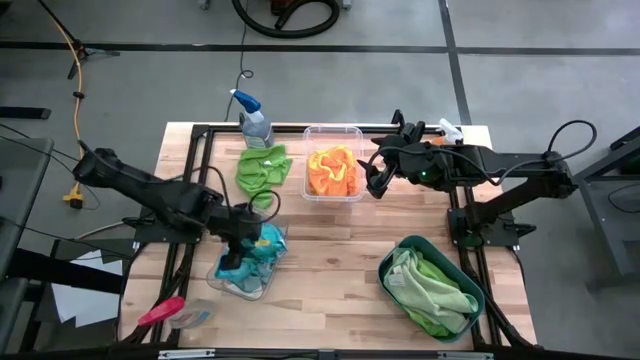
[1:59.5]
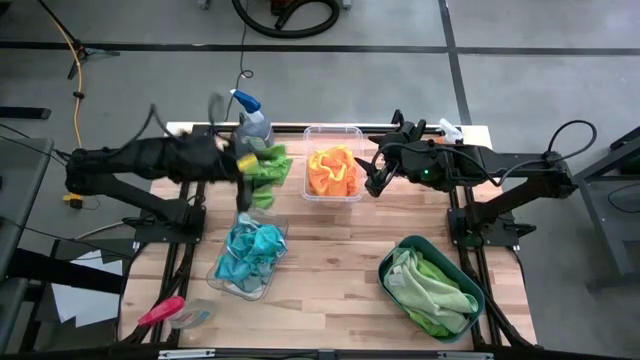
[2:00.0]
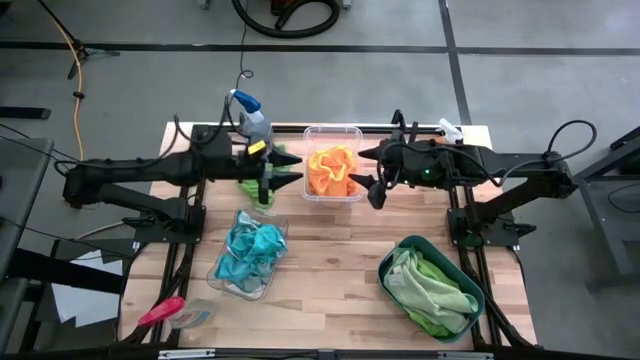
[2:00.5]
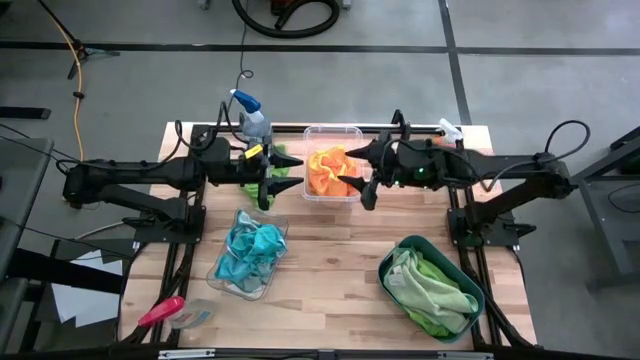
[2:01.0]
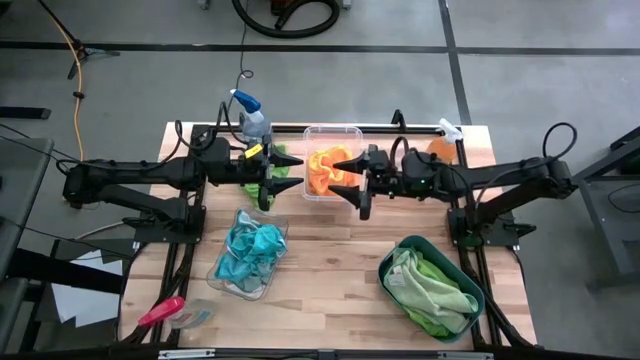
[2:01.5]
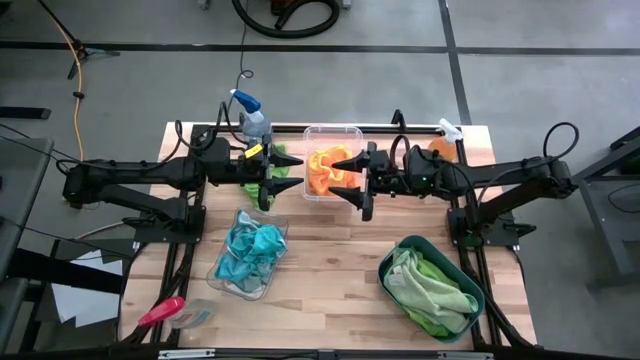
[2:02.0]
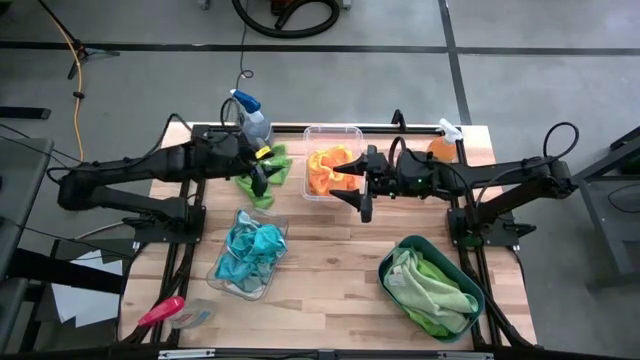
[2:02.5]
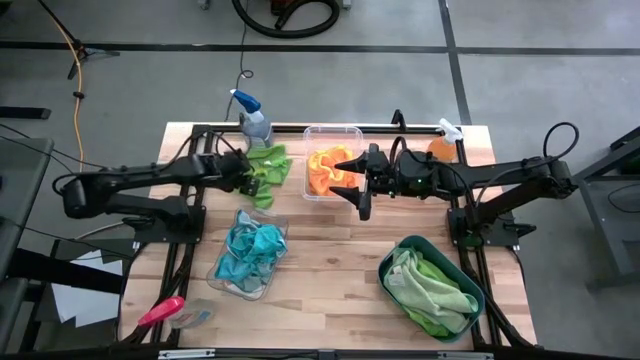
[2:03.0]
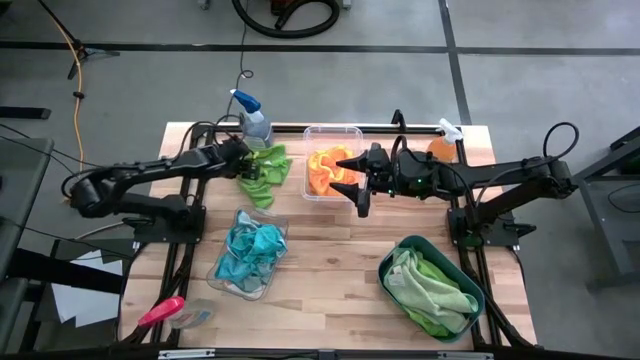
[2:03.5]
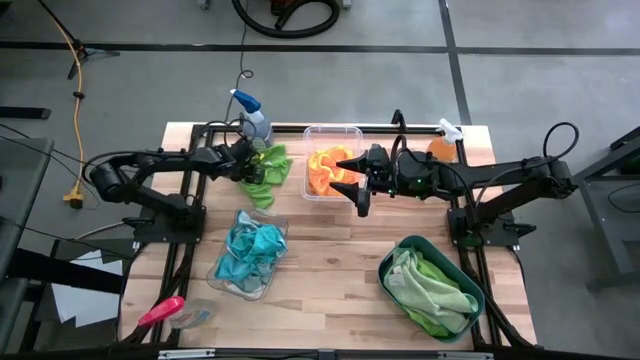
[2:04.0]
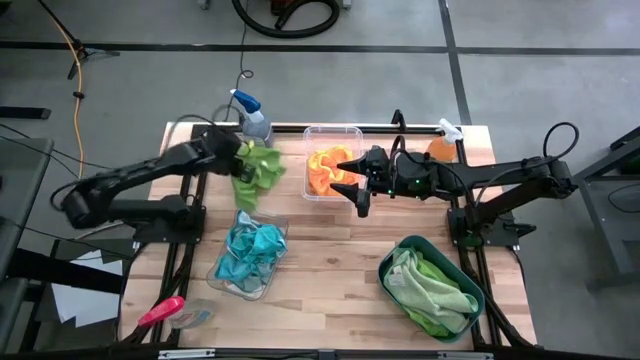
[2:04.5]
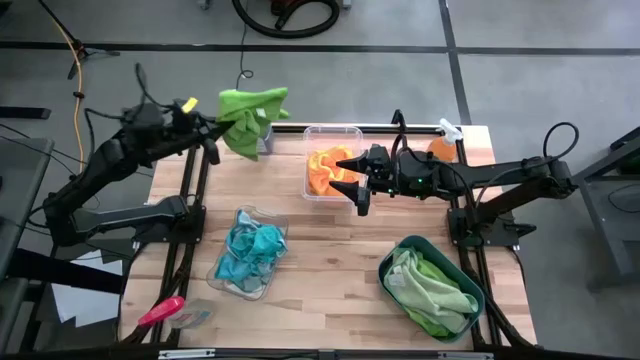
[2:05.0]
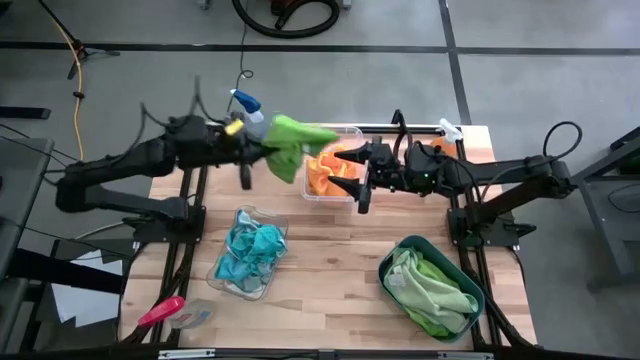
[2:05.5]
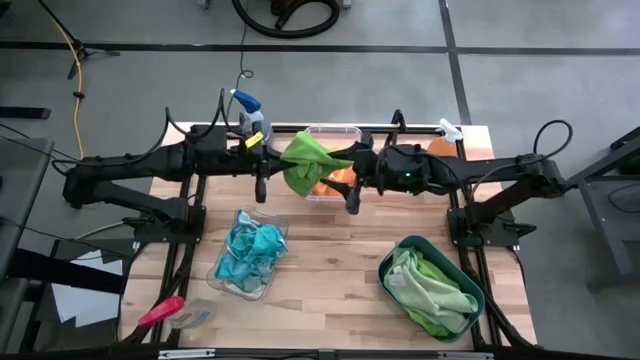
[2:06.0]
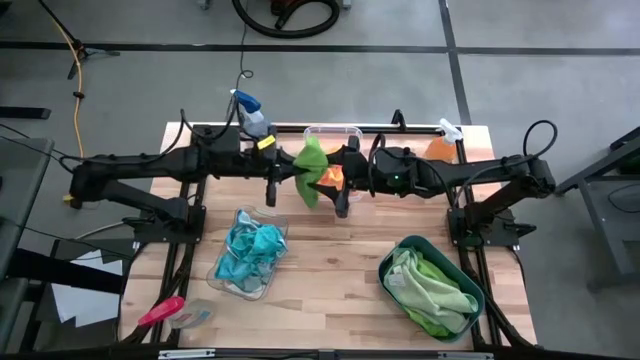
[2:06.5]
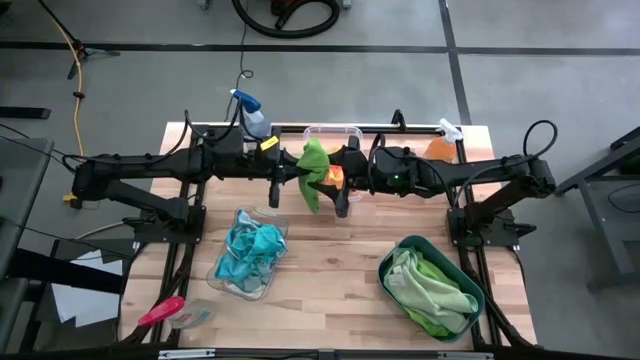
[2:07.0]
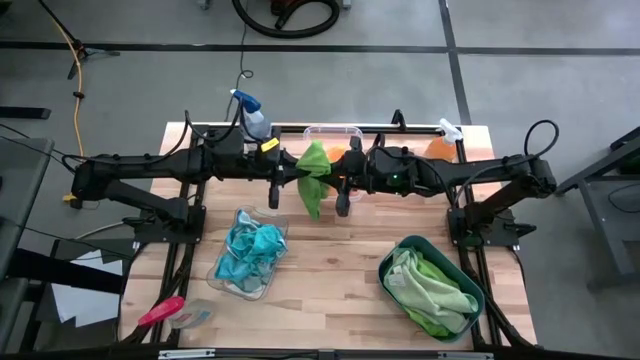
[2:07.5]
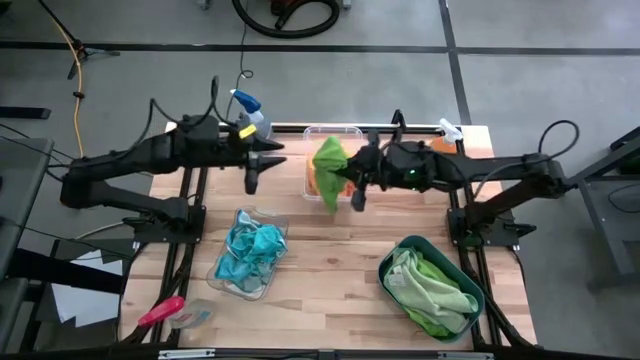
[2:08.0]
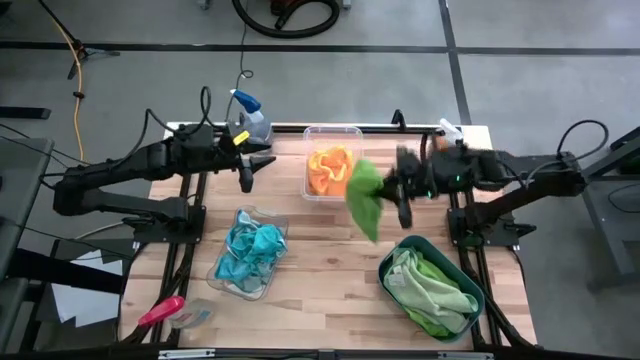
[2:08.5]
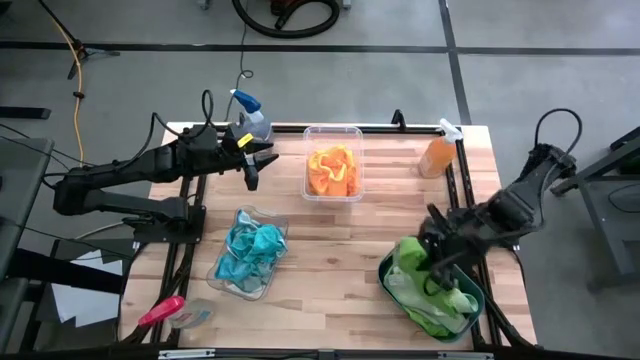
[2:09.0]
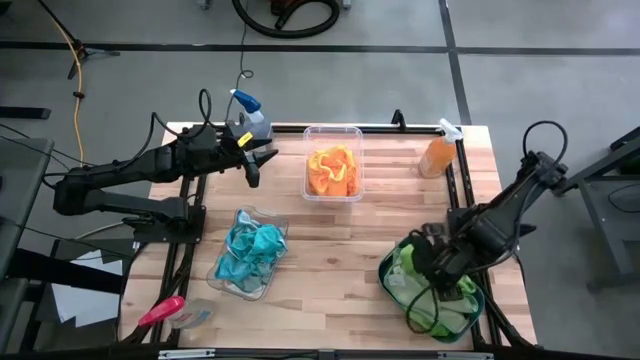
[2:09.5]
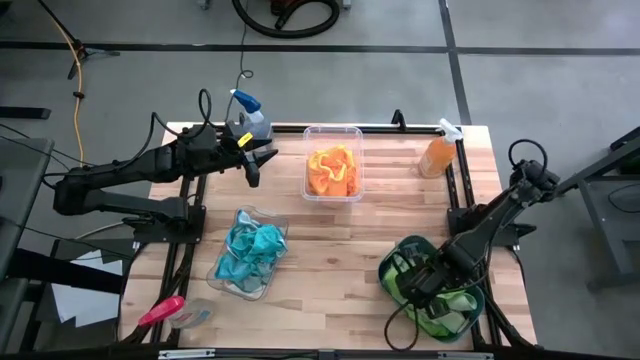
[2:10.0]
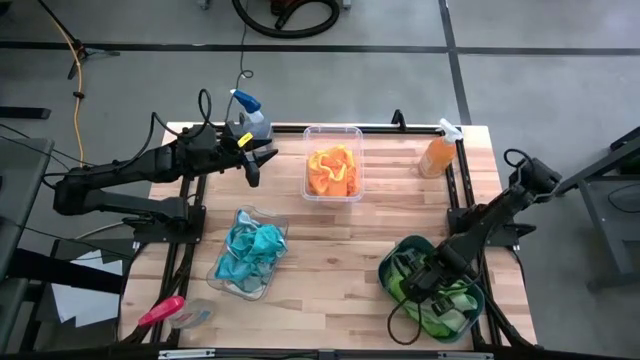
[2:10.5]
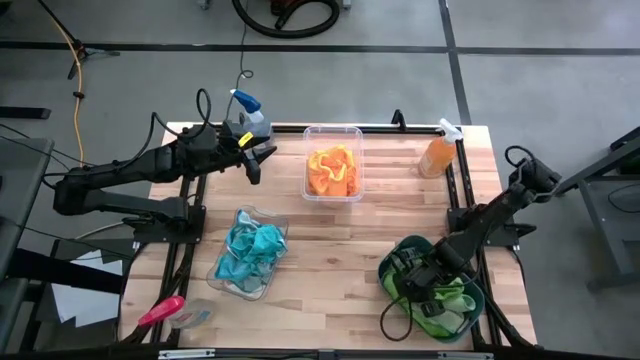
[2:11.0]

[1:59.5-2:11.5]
Task: Sort microfiber towel by color & place in baskets
Put the green microfiber towel into the green bin

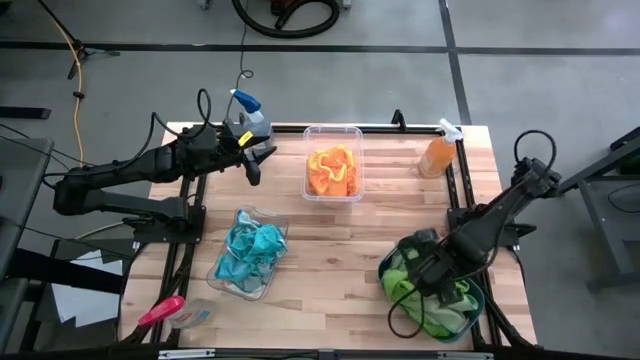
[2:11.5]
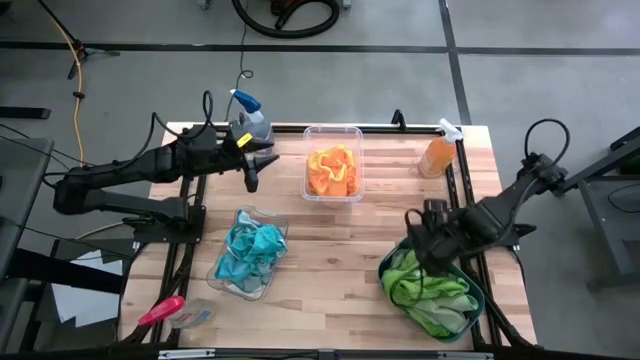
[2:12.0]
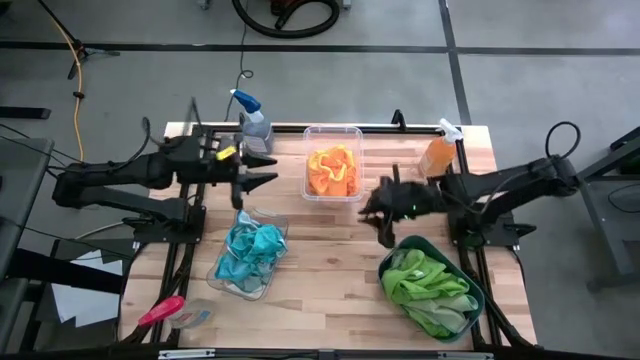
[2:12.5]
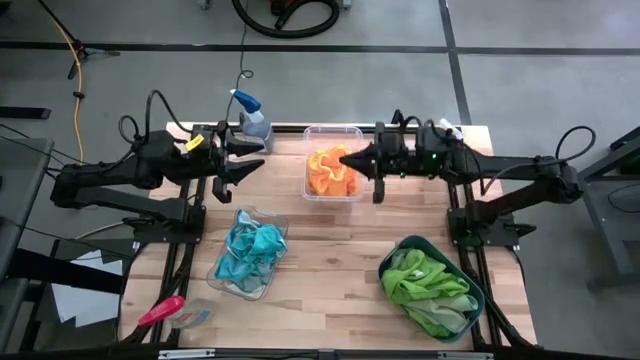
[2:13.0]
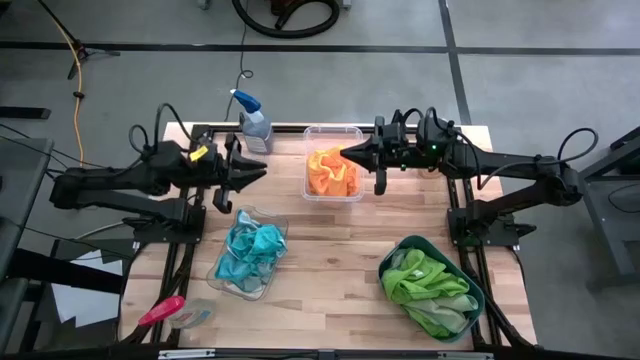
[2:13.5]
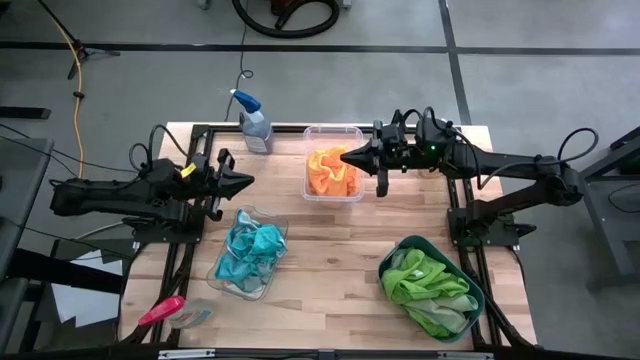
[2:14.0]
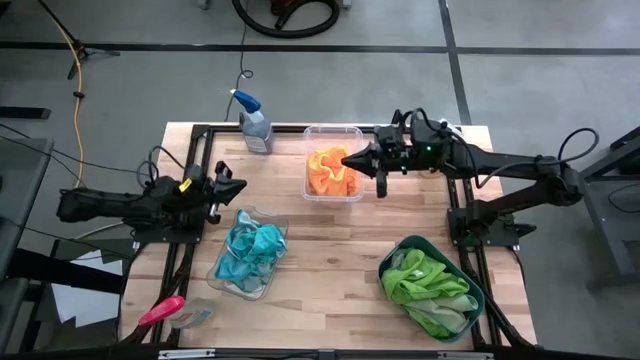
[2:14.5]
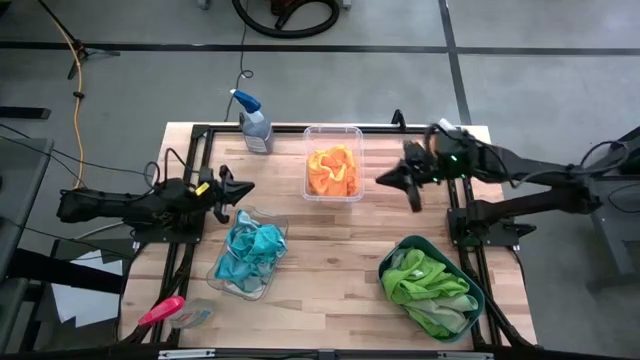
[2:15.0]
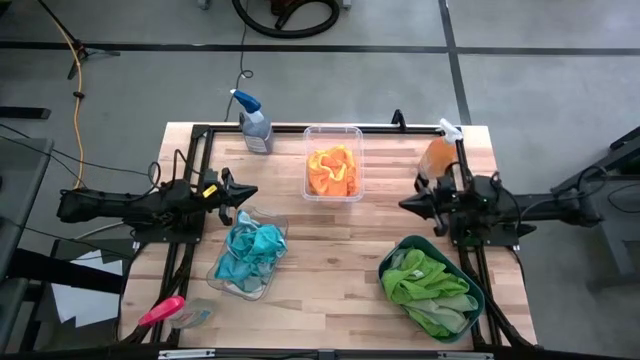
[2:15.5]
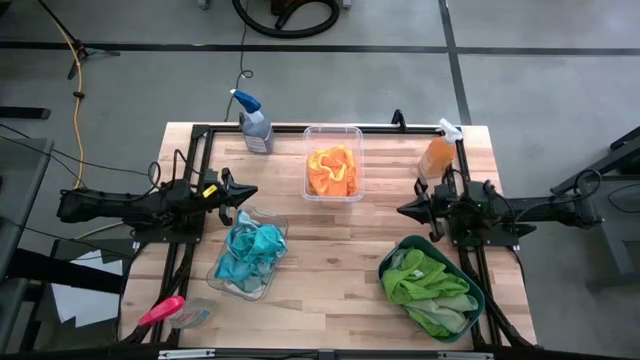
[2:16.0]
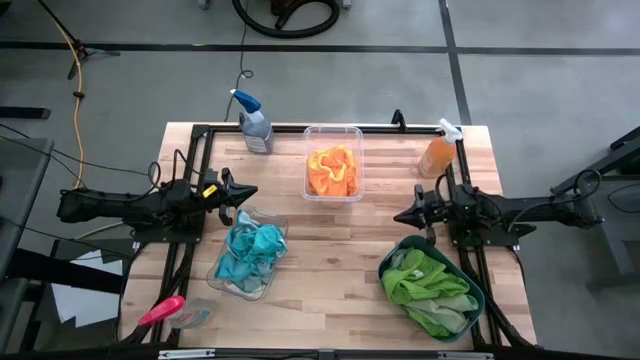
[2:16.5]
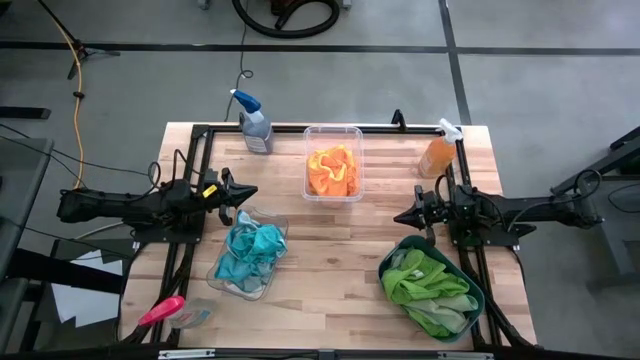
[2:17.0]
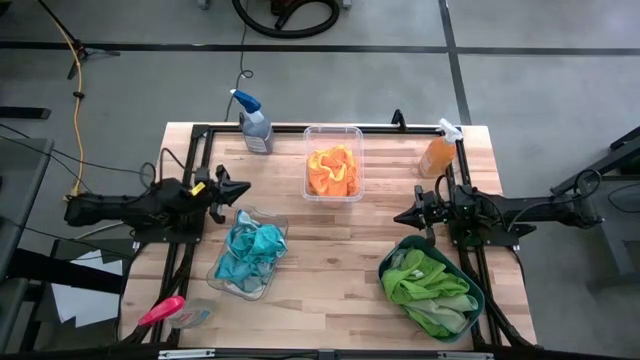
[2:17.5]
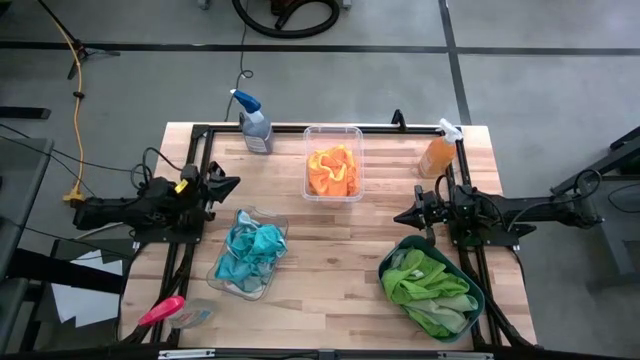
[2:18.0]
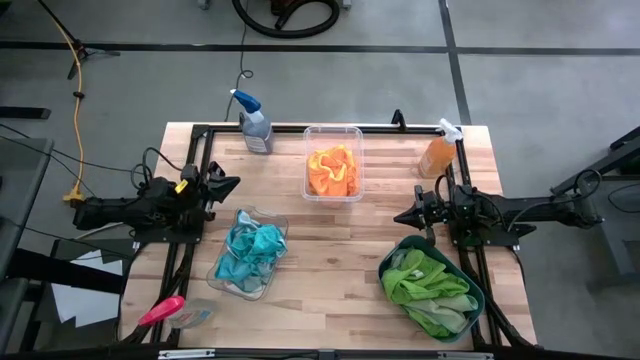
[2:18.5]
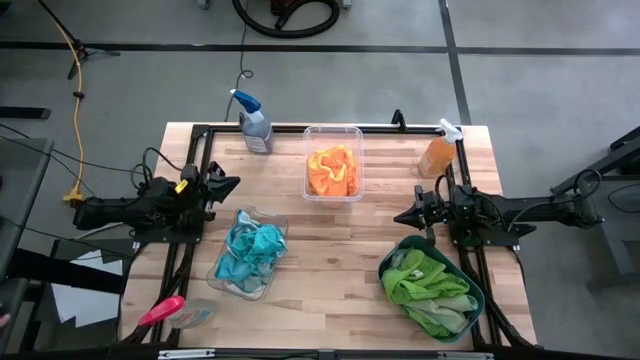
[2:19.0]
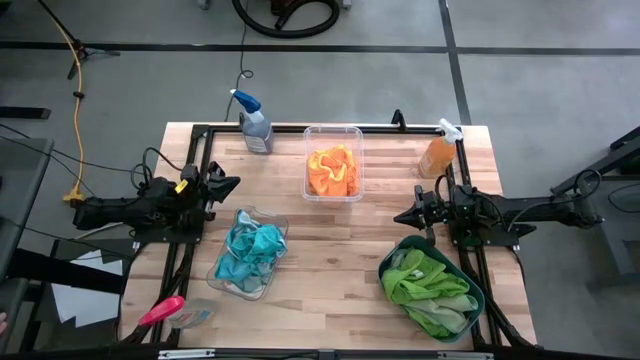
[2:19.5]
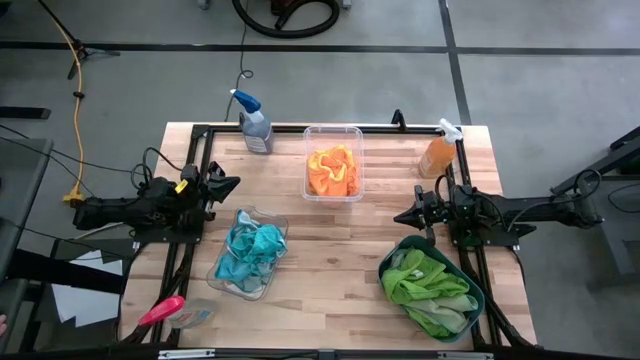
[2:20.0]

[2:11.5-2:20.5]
Return to Home Position
